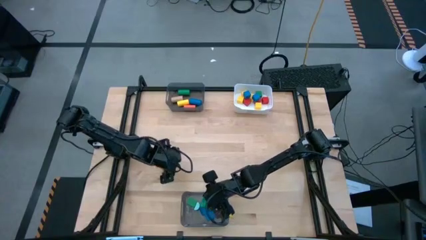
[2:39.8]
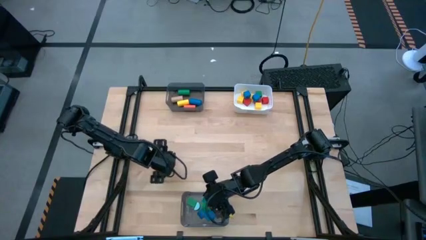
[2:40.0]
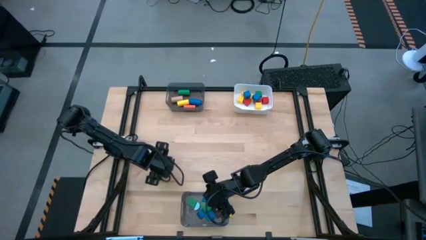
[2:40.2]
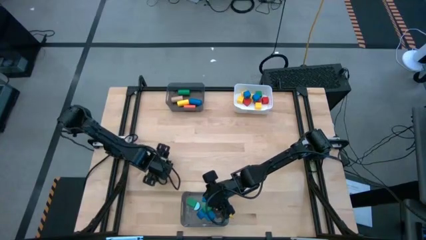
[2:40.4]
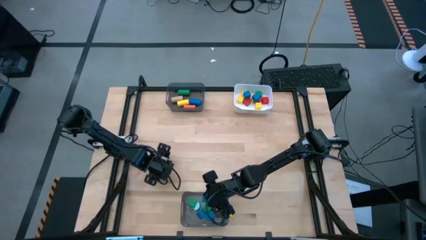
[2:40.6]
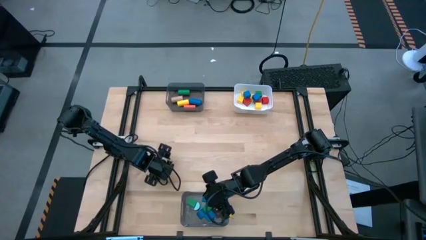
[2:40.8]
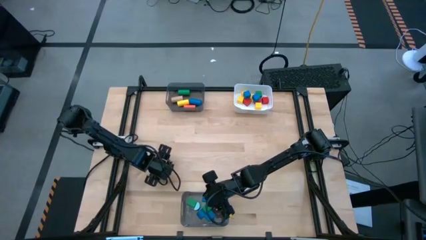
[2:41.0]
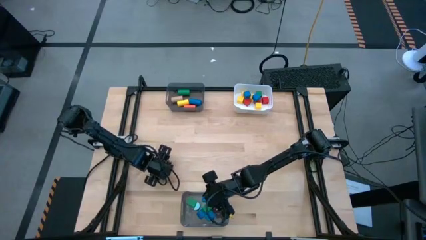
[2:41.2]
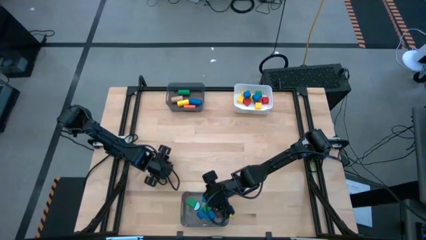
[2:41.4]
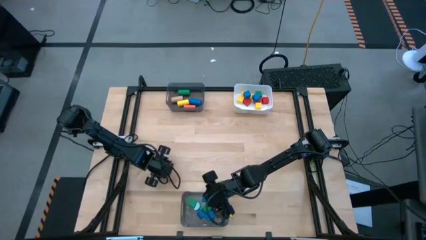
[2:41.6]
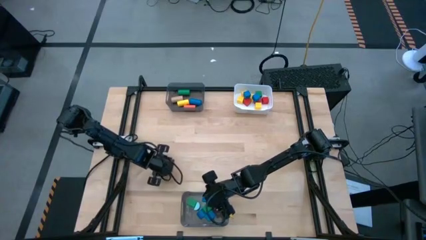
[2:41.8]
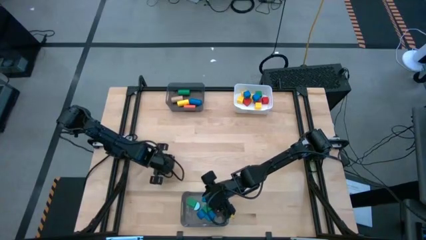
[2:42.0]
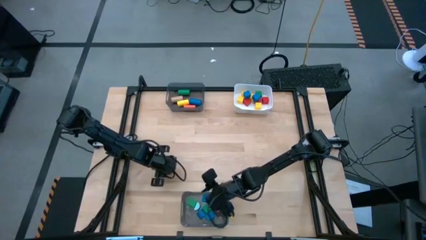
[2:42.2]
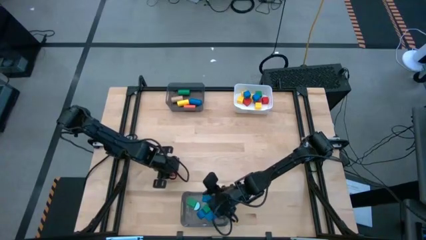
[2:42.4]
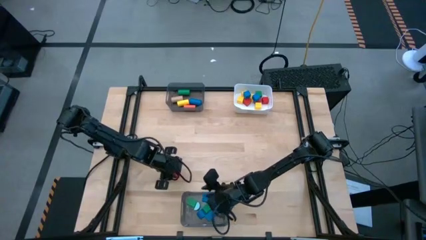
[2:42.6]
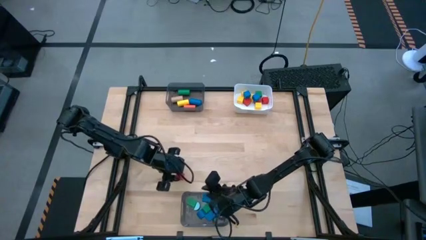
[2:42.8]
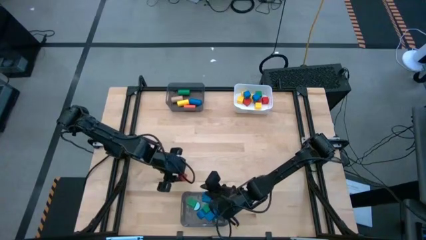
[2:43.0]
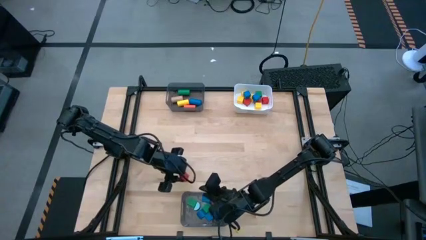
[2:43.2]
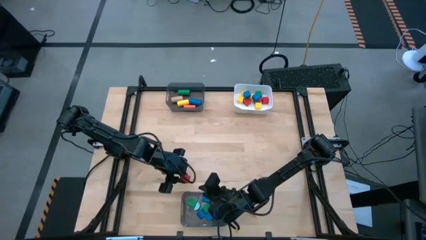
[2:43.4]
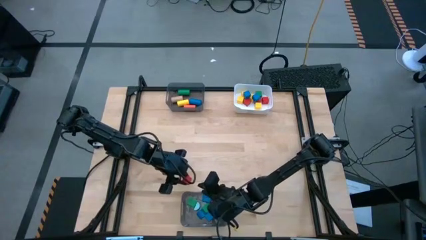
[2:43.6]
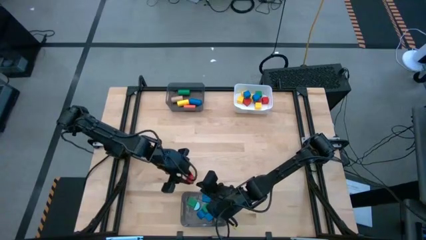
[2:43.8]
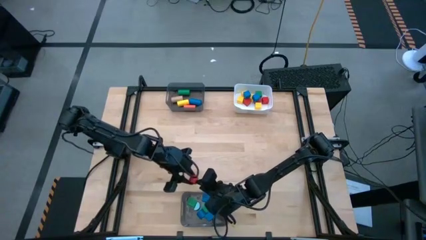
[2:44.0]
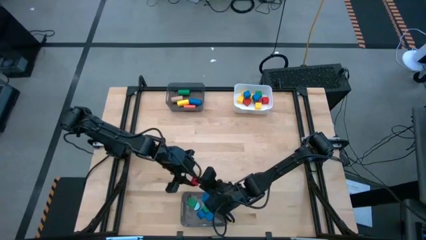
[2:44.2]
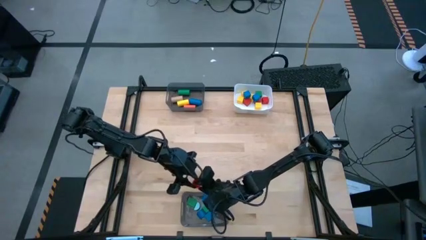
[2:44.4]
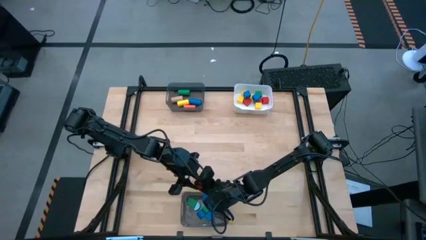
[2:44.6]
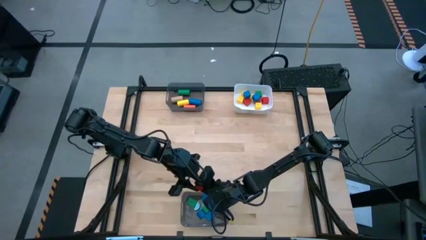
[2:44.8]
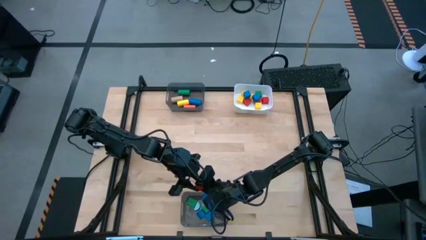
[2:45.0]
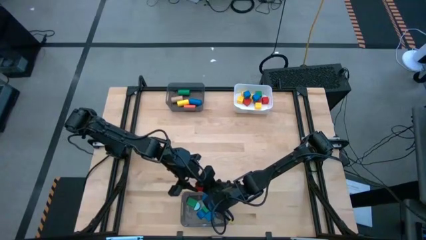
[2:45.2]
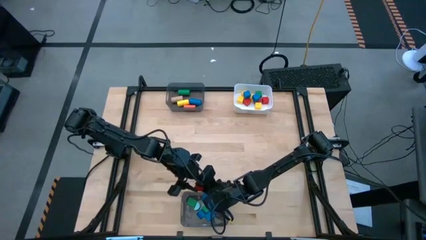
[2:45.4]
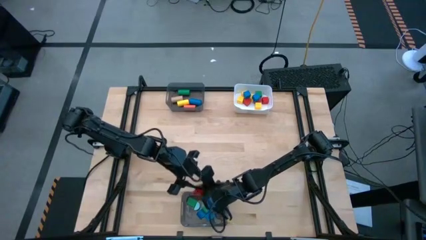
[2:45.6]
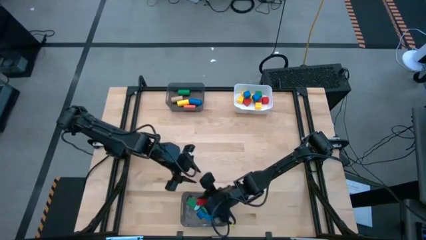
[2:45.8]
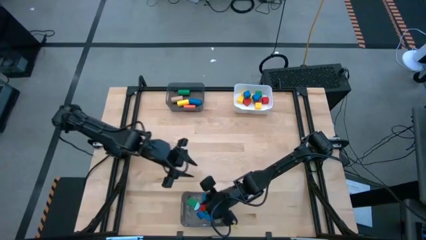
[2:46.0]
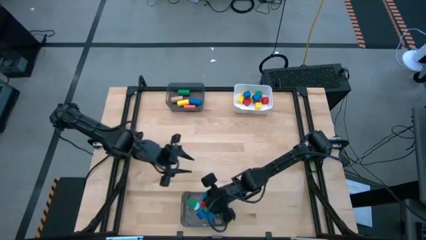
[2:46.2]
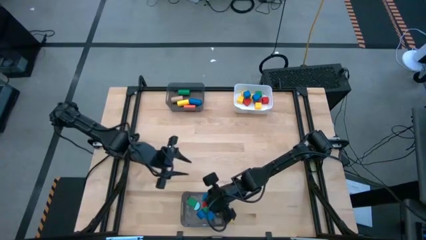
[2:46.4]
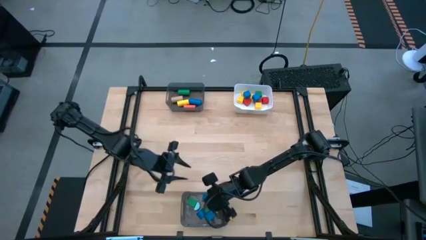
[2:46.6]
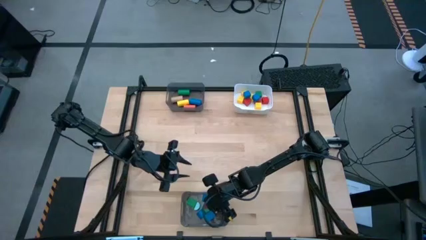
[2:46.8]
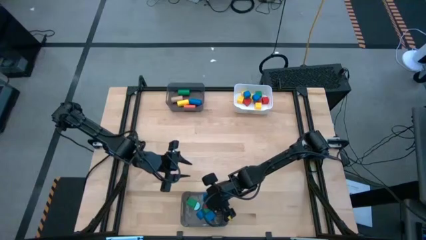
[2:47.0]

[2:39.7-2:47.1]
Task: Sort blocks by size
Put the red half circle block into the bottom black bin

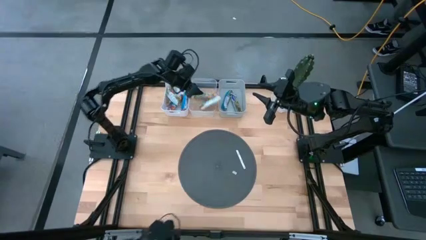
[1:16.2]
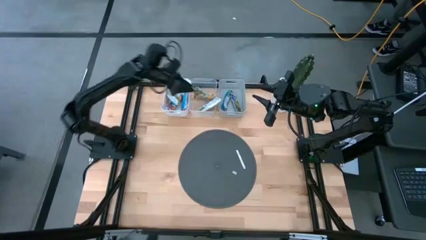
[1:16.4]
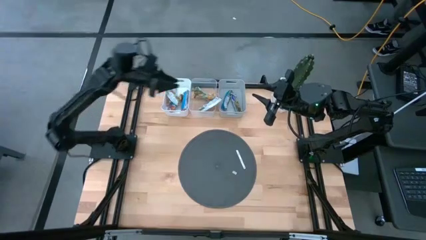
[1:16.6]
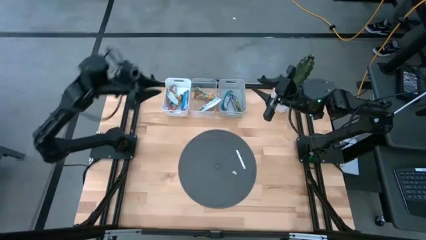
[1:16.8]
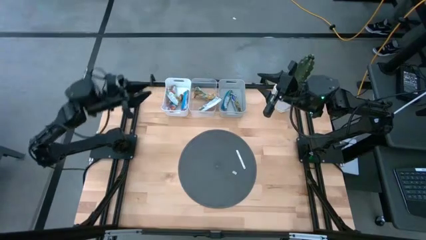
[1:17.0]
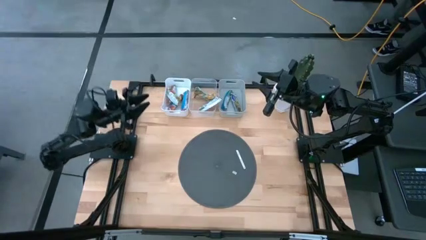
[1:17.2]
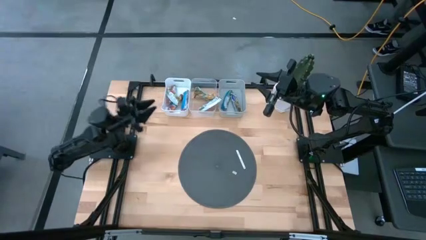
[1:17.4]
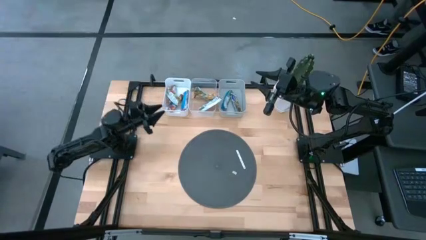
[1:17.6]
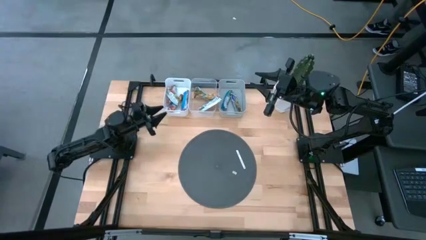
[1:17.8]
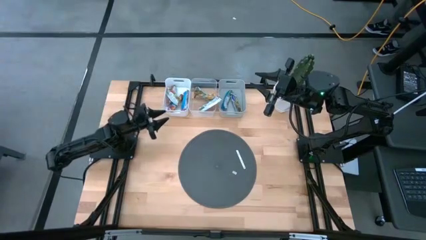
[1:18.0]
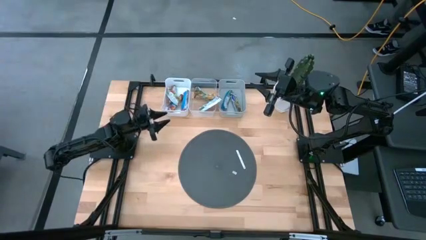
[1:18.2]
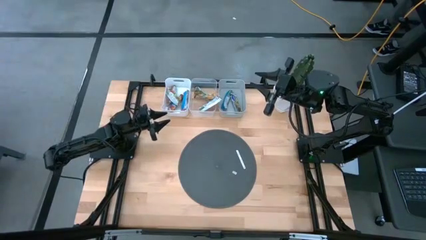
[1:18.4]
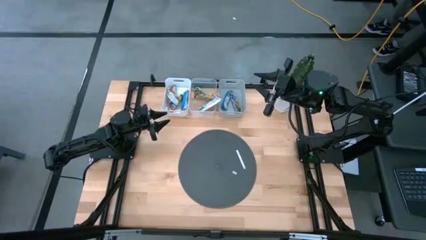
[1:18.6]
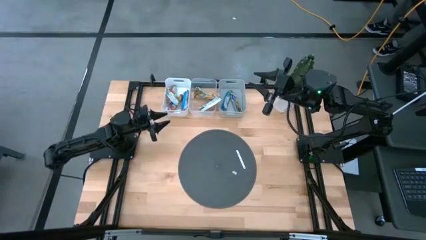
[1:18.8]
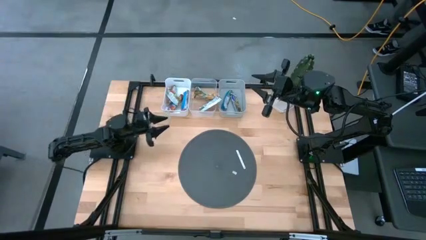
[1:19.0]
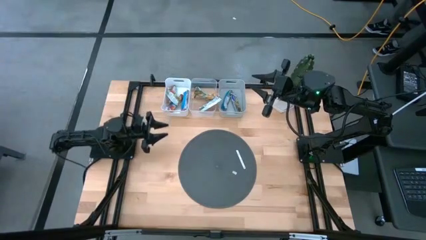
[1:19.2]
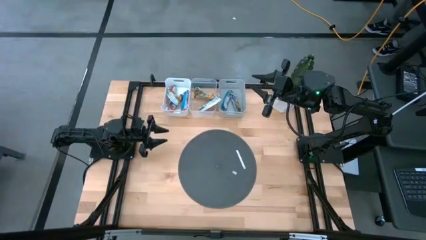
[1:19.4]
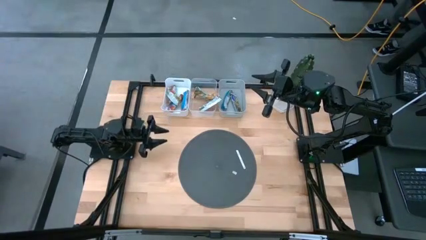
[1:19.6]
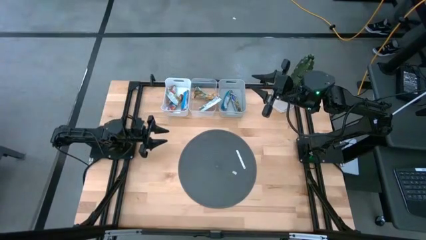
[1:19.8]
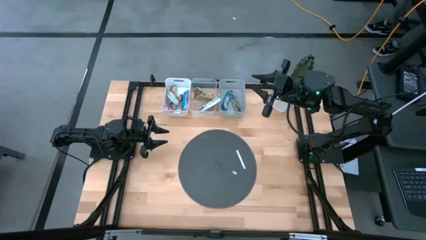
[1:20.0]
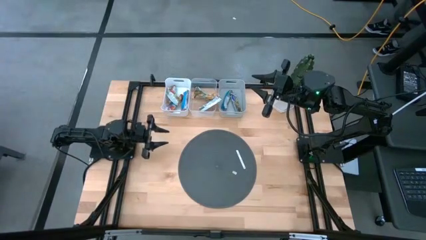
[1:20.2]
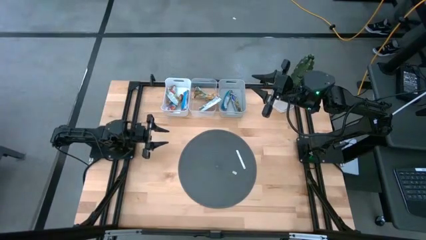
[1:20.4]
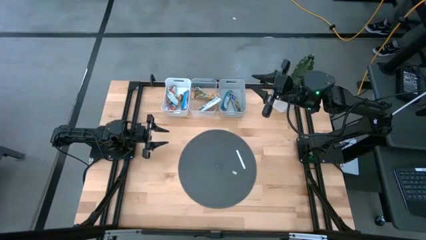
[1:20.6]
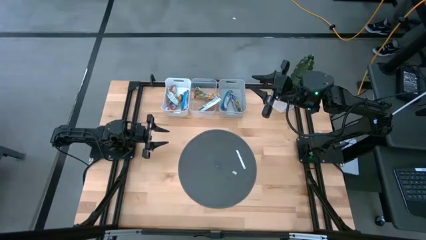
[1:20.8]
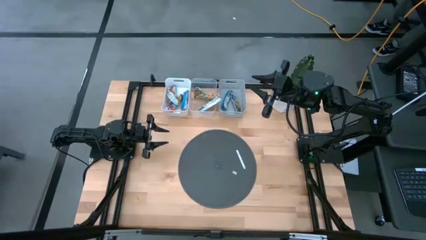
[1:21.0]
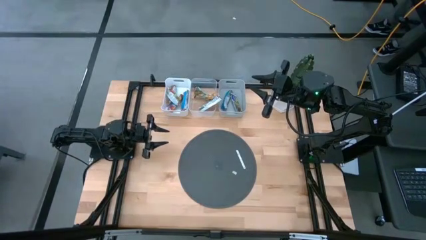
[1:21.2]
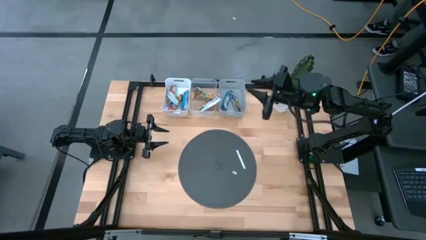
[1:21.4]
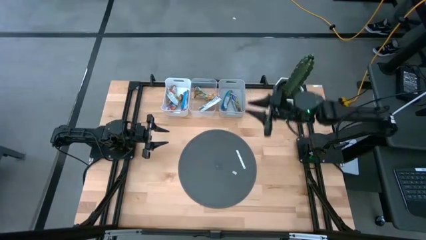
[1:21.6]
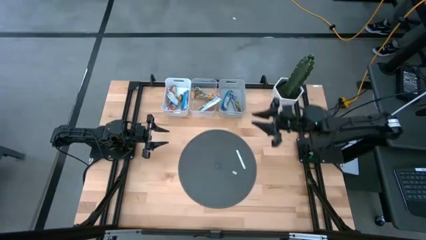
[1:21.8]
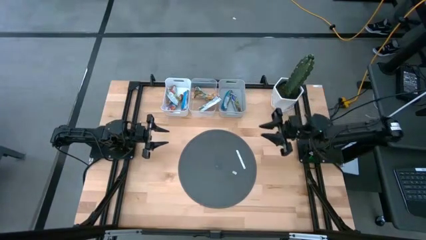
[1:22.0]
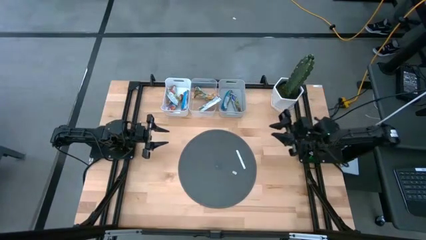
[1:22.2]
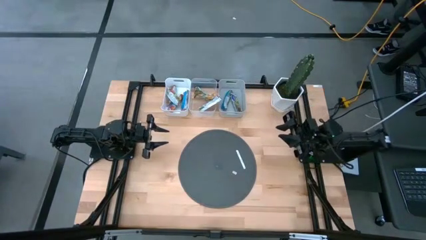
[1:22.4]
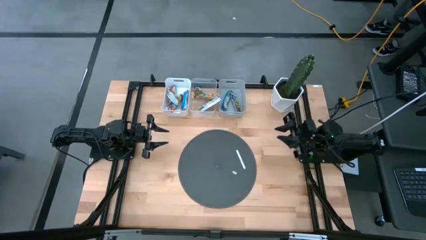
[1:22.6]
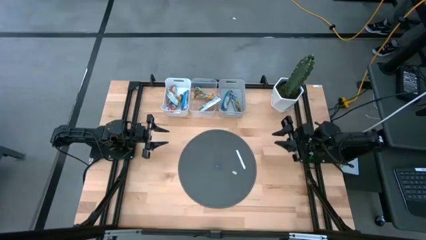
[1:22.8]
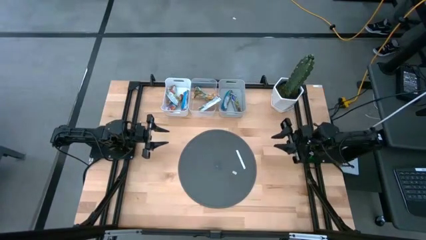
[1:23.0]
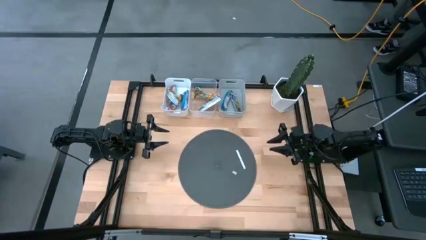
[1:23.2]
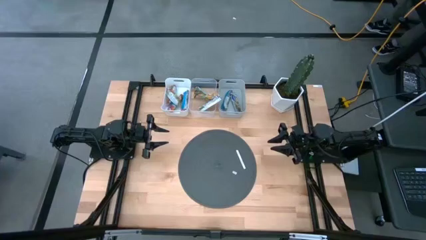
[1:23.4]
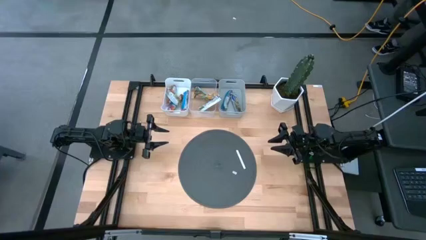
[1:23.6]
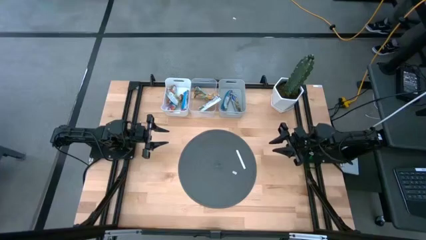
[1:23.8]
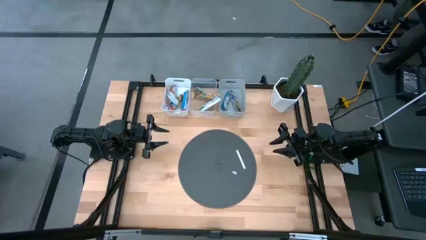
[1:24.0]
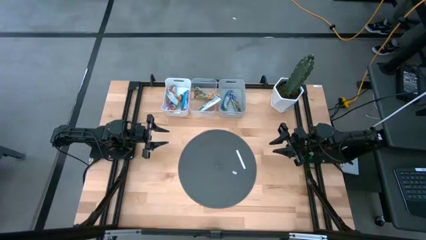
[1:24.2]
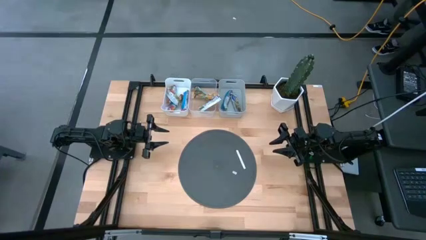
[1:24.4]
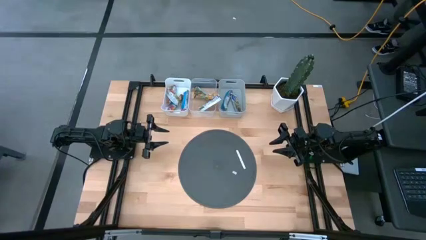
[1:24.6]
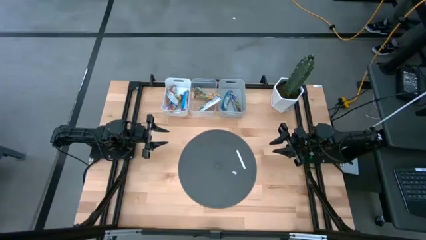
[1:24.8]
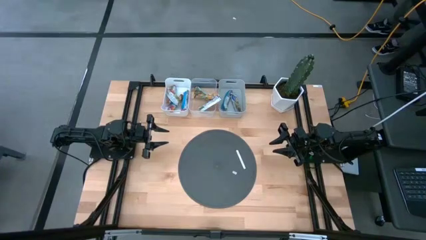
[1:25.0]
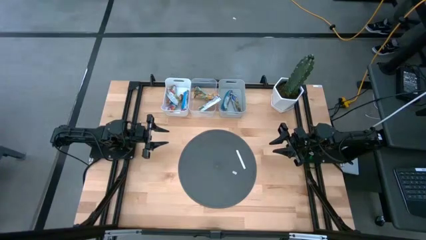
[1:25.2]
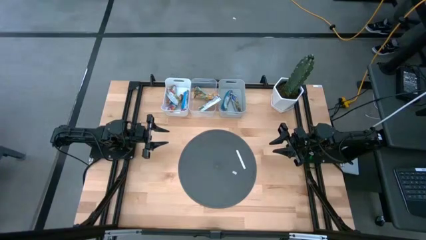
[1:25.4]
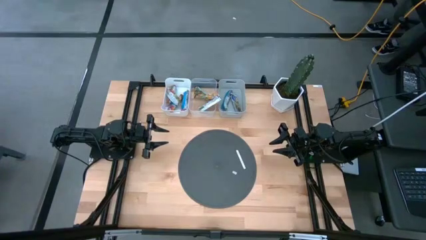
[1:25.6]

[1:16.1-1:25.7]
Task: Pick and place Granola Bars by type
Return to Home Position
